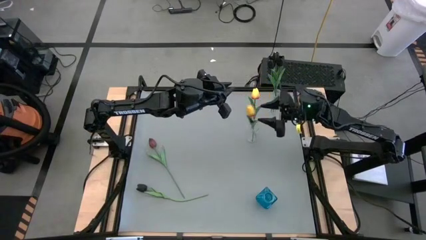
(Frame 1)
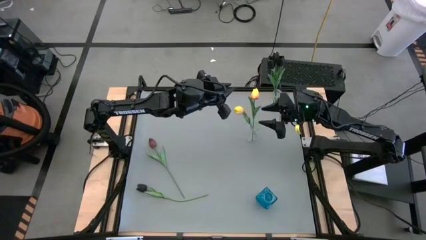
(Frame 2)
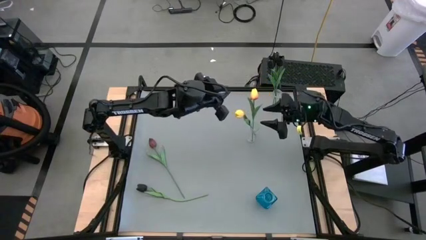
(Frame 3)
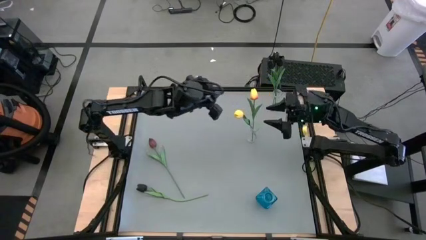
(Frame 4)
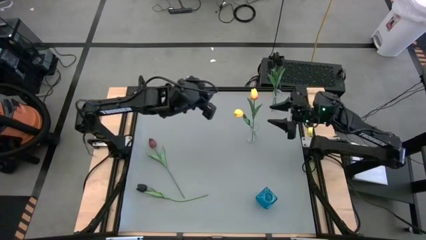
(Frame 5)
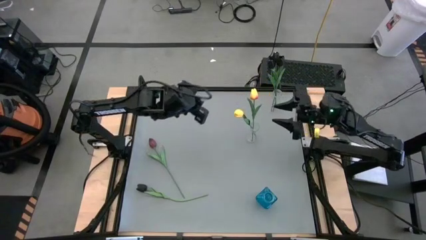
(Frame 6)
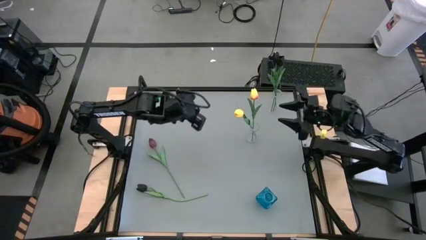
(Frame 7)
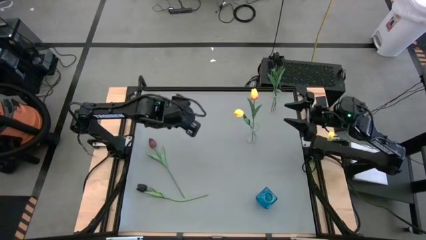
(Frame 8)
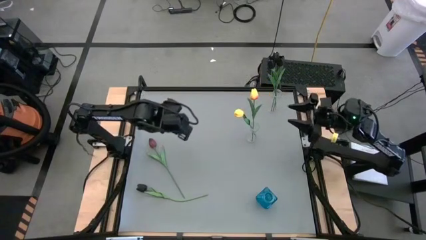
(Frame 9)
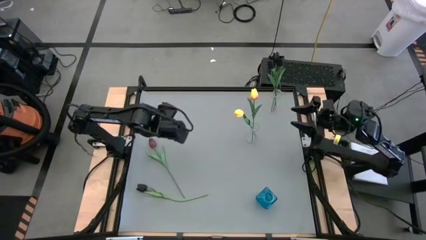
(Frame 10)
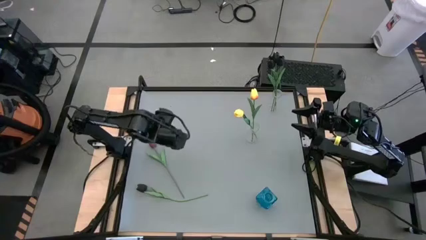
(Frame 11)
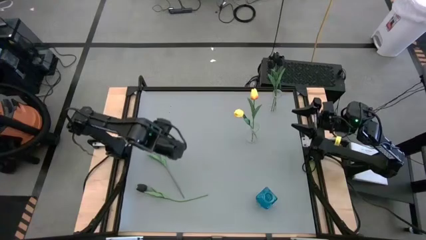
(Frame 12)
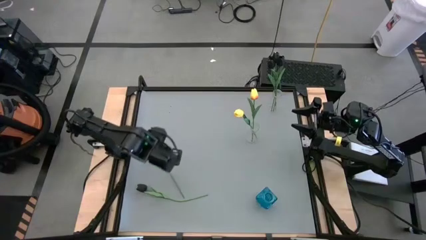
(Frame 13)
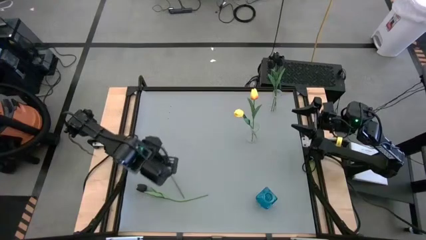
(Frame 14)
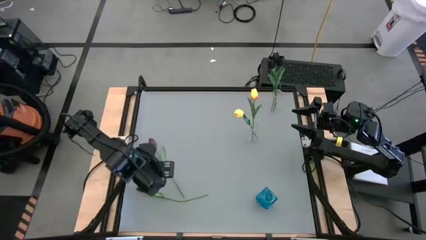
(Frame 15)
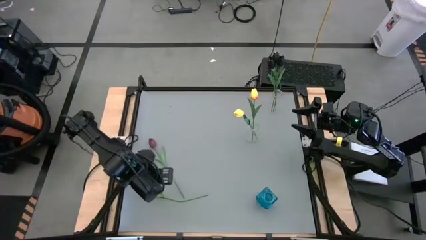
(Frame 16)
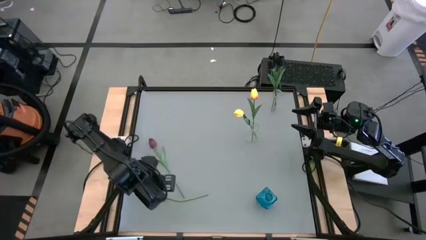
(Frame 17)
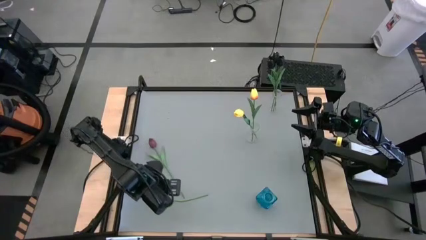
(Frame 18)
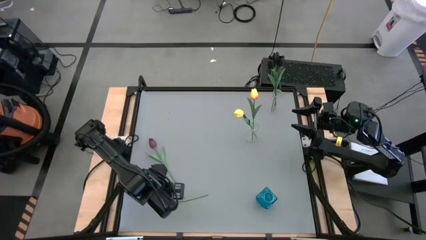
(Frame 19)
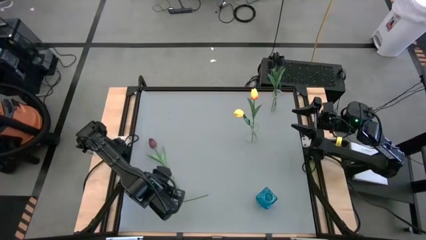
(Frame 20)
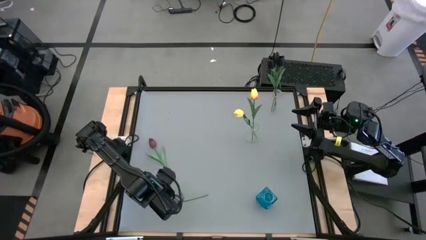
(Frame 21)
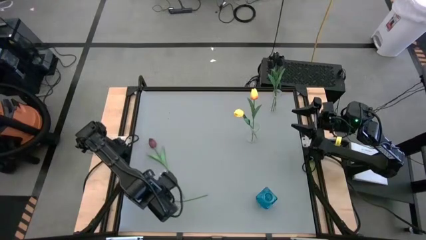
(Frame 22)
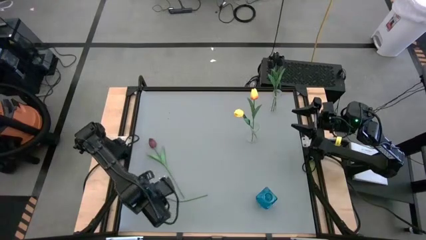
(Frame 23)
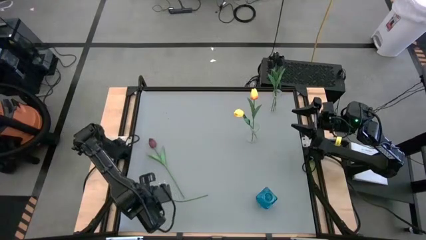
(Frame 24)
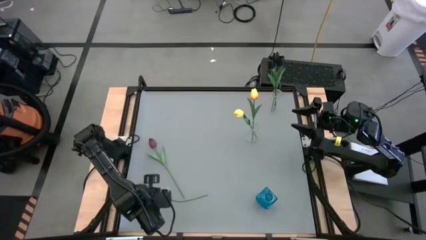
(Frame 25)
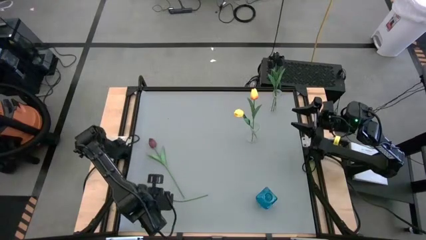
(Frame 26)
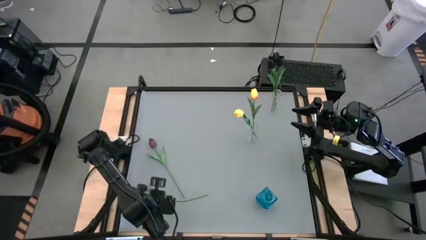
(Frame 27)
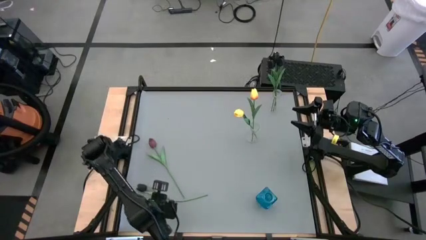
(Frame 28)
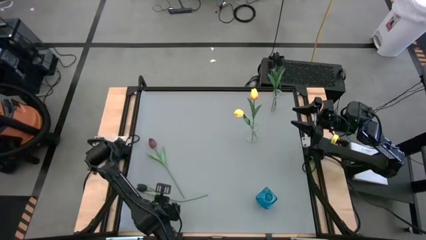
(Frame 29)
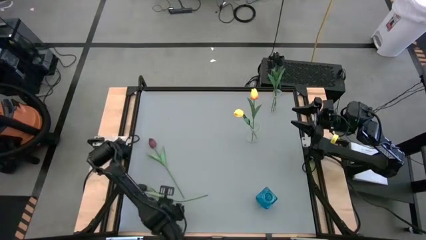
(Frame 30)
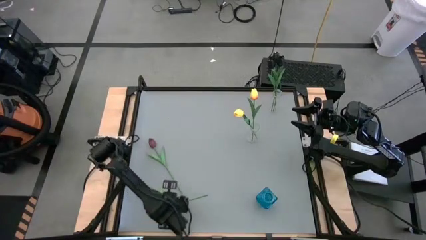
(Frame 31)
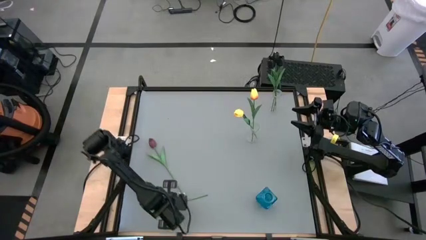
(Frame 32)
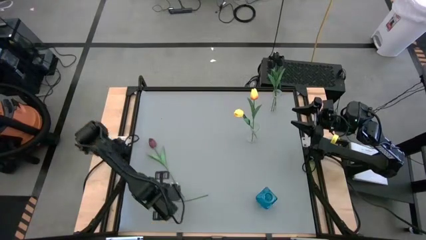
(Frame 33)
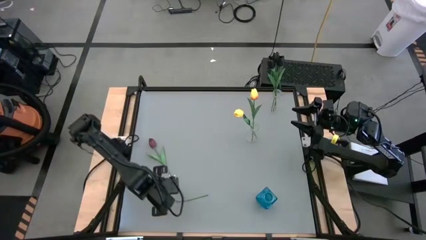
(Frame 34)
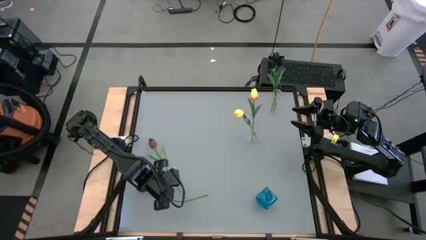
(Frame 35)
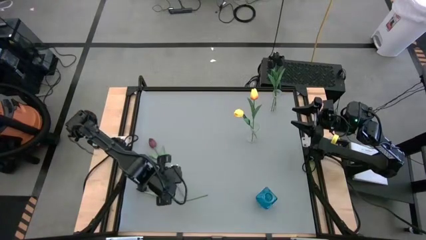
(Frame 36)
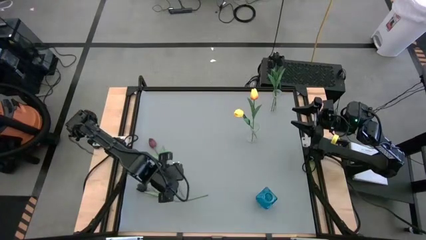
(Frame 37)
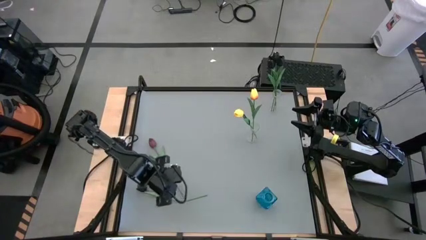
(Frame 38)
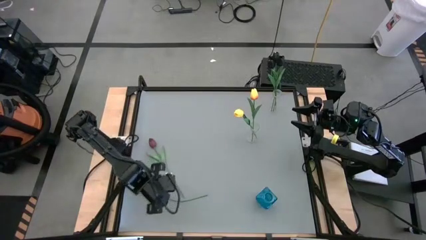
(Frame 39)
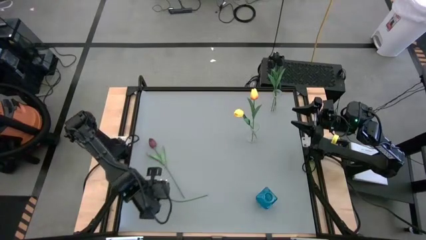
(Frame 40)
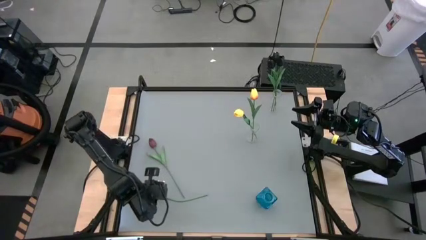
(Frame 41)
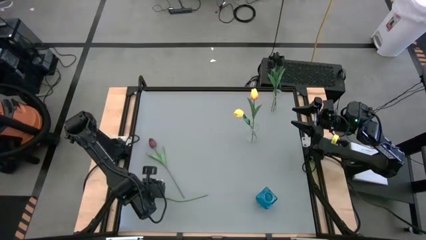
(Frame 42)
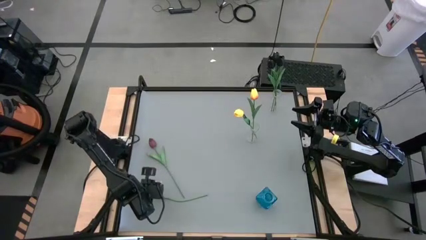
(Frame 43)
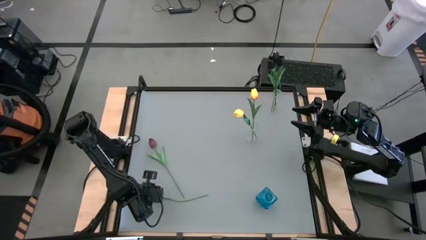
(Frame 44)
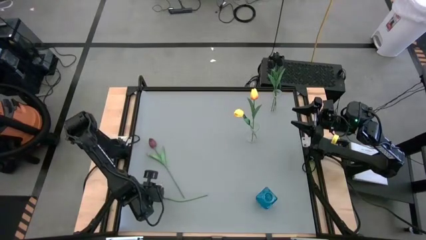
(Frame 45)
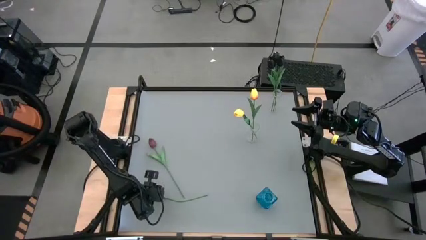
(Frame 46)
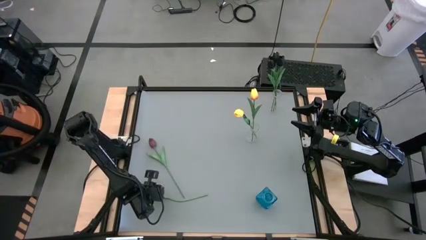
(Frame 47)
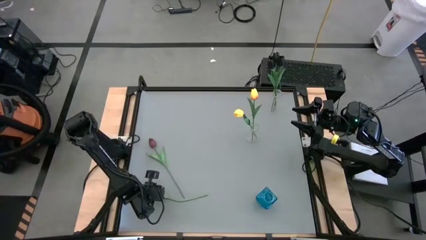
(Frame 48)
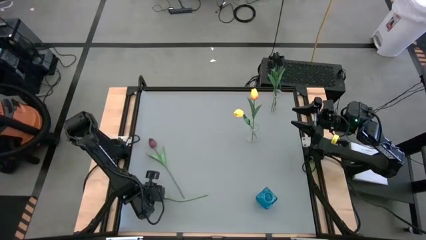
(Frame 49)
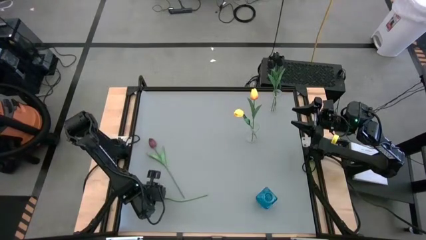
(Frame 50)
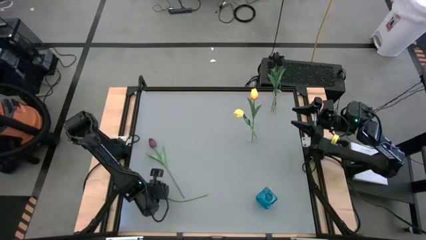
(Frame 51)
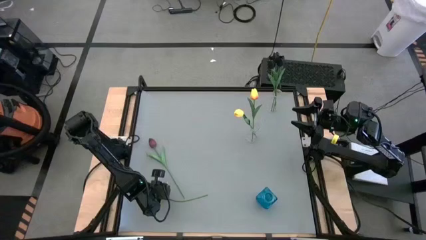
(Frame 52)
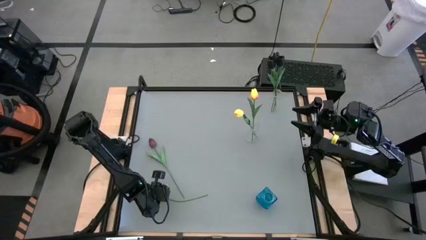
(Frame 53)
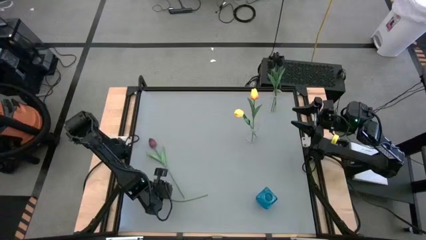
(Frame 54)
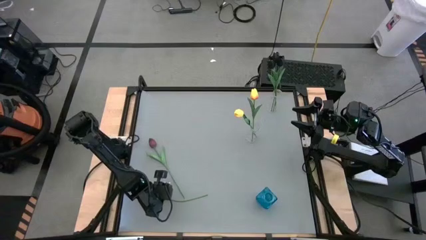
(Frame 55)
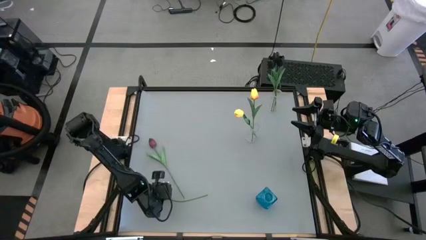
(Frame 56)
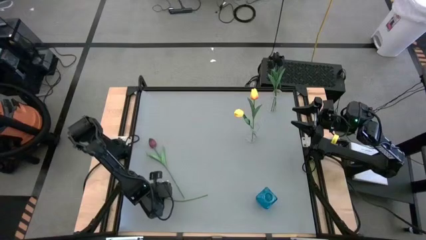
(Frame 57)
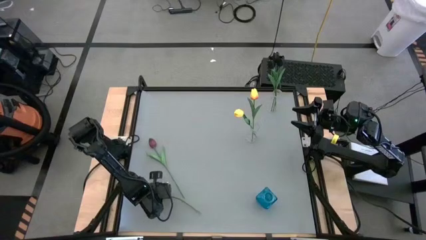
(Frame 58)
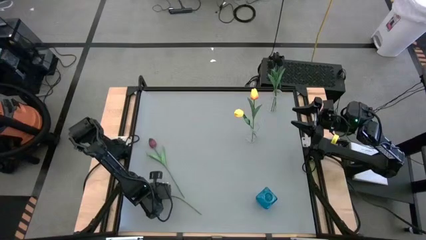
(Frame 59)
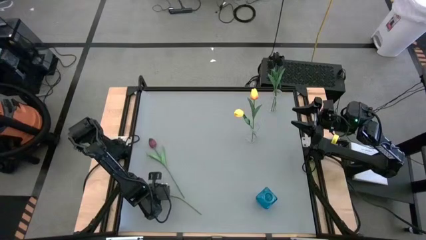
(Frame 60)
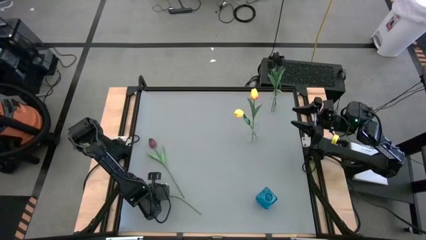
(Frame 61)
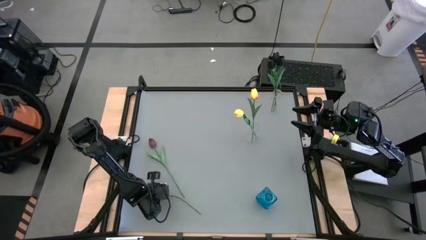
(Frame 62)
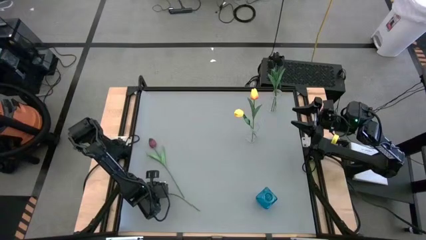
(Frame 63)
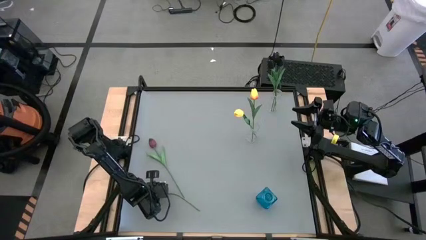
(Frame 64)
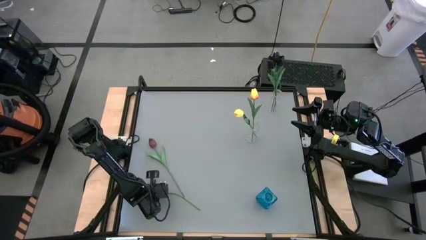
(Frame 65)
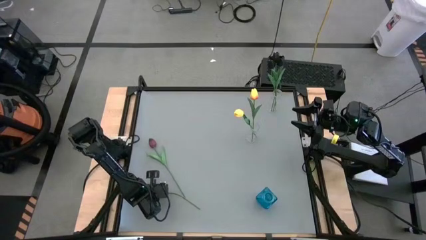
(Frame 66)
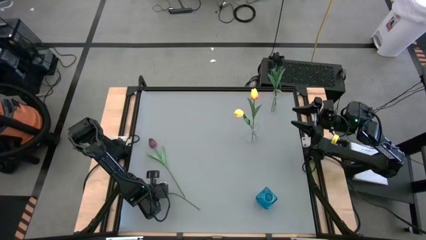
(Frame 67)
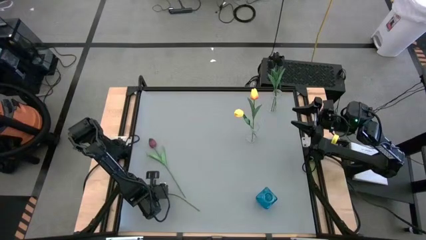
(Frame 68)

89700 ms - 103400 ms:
Task: Sort flowers into vase by color
Put the black tulip into the top transparent vase

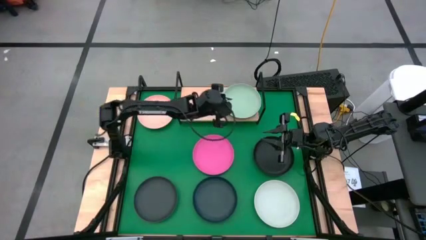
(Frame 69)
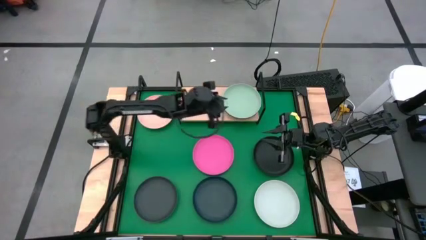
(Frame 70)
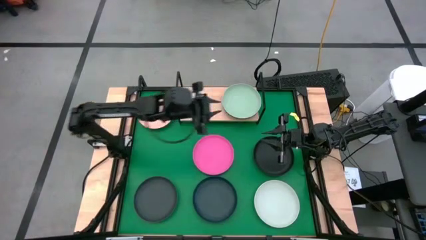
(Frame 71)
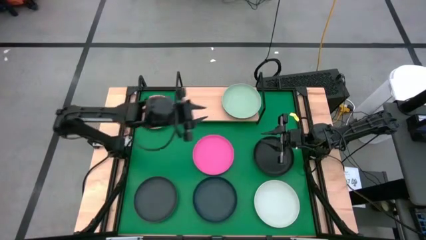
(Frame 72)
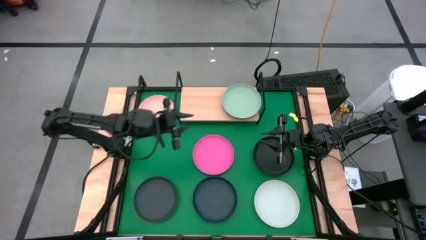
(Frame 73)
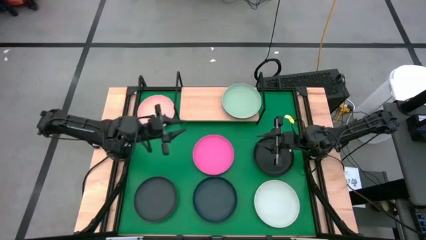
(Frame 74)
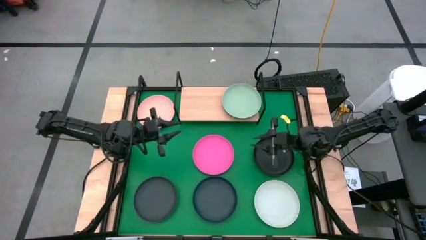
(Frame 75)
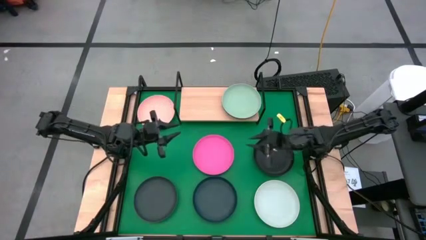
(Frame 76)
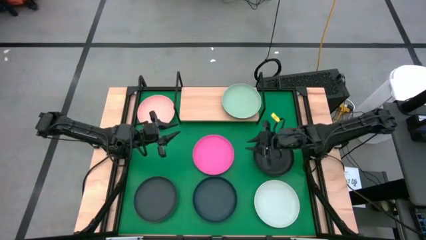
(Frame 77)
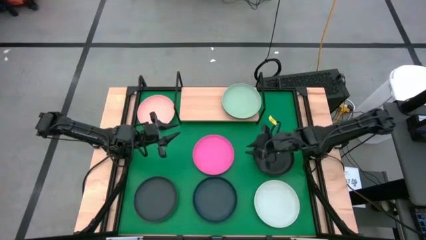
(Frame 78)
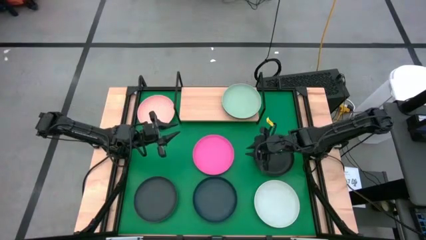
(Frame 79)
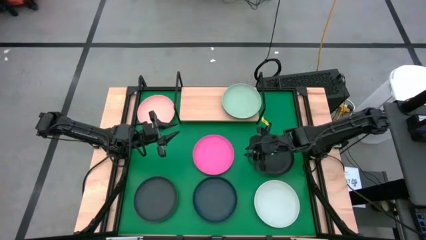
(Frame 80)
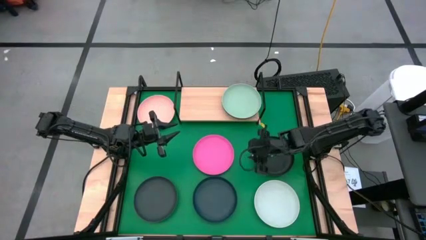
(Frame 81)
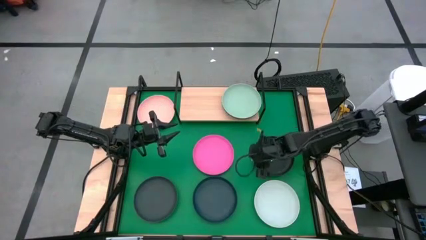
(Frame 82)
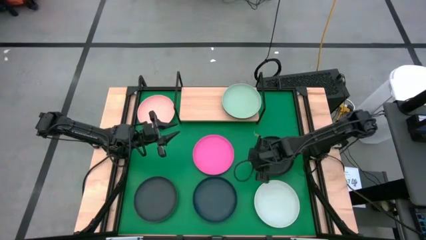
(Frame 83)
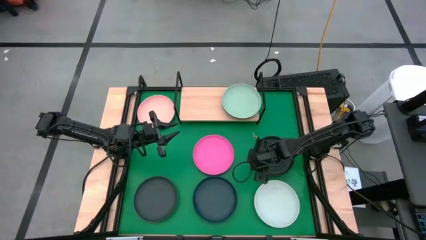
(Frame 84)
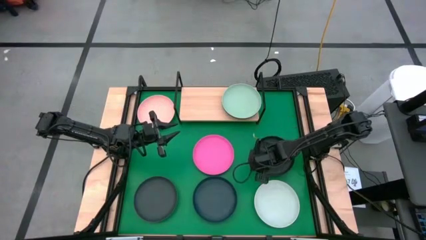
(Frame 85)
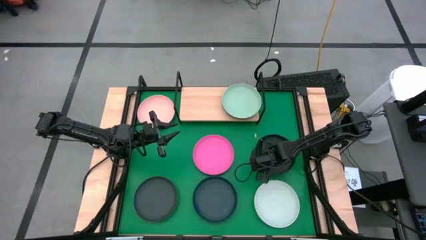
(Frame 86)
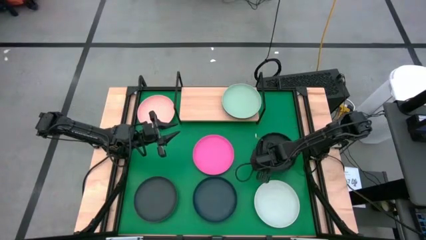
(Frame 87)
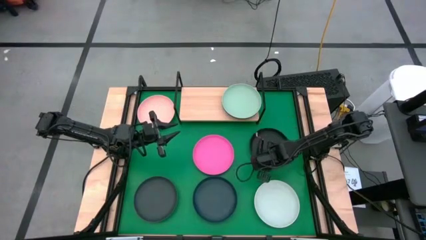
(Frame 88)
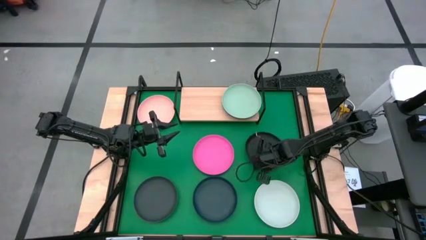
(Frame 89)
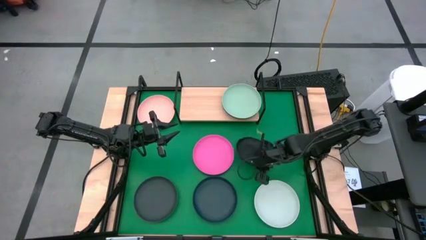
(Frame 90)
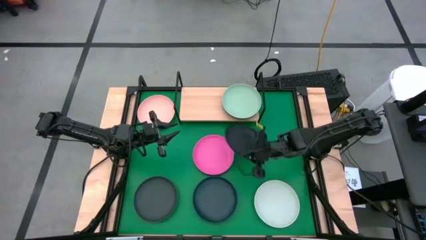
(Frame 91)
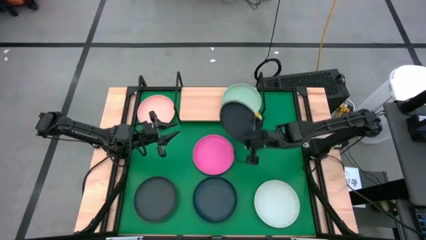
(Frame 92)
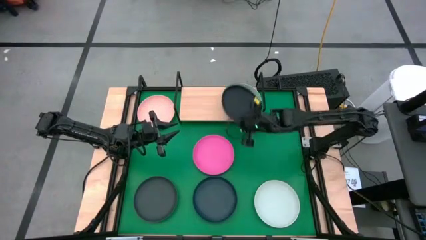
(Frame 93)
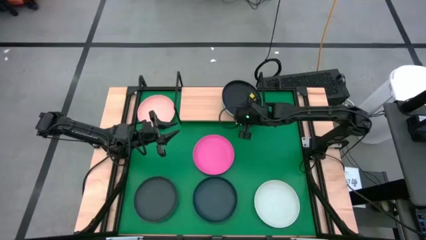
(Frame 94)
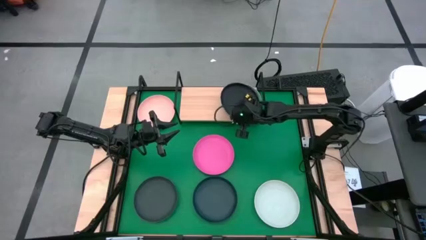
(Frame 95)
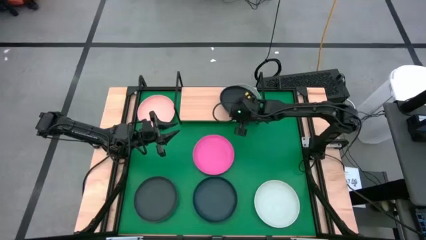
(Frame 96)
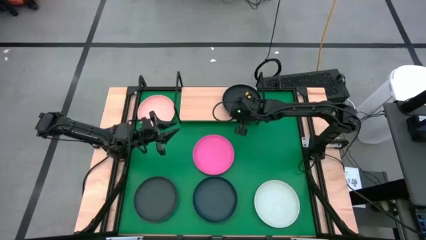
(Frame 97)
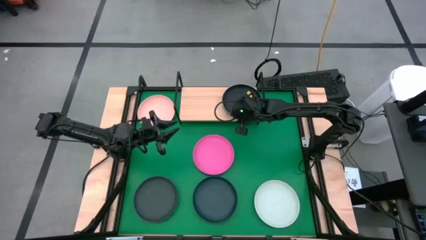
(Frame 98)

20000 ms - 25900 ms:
Task: Place and stack plates onto a shelf
Stack the right black plate on top of the light green plate on the shelf
